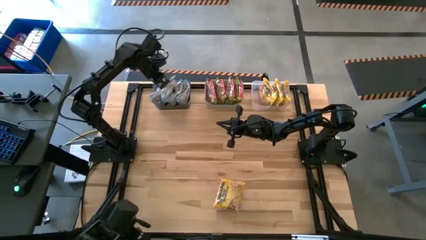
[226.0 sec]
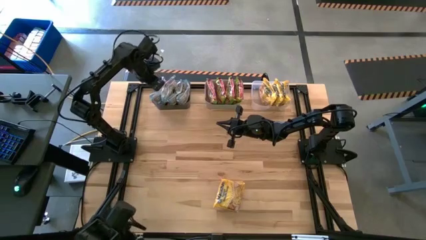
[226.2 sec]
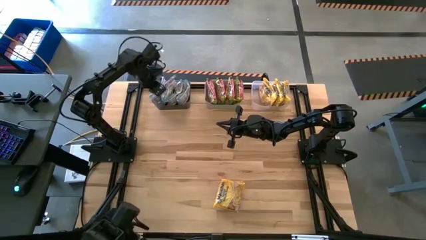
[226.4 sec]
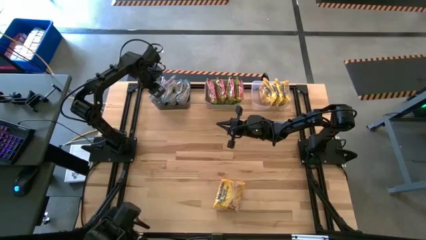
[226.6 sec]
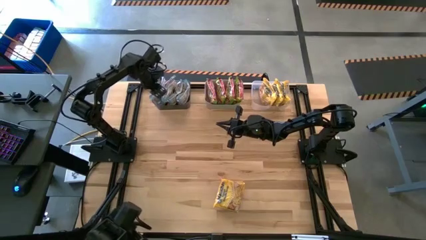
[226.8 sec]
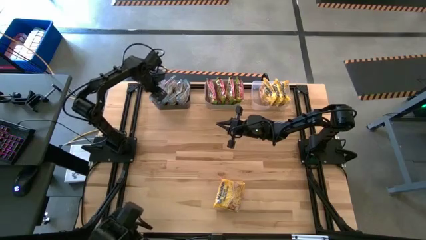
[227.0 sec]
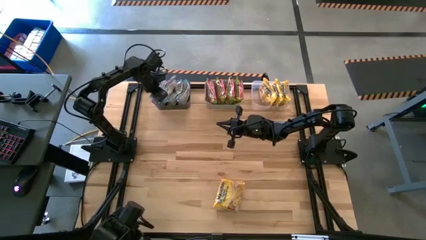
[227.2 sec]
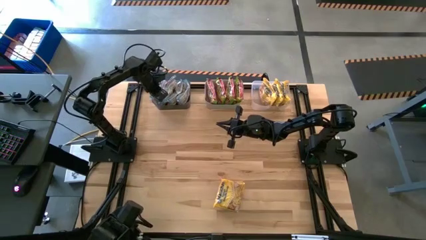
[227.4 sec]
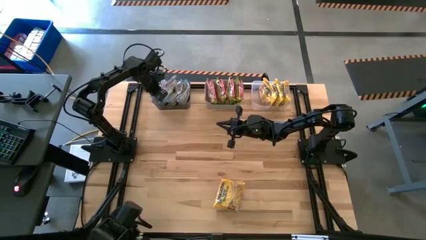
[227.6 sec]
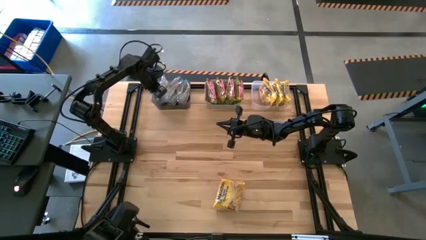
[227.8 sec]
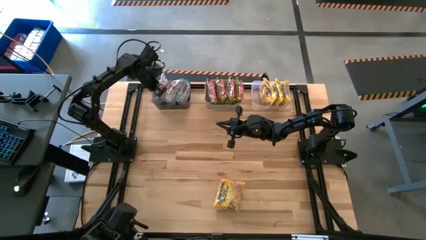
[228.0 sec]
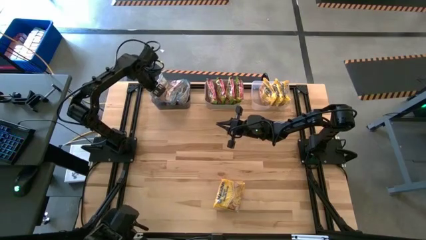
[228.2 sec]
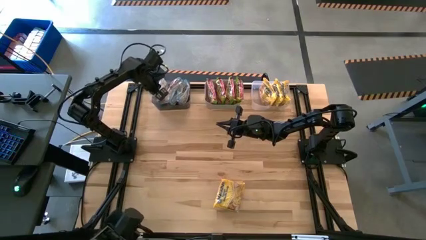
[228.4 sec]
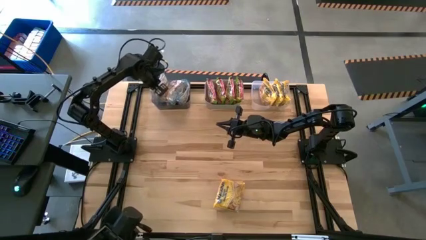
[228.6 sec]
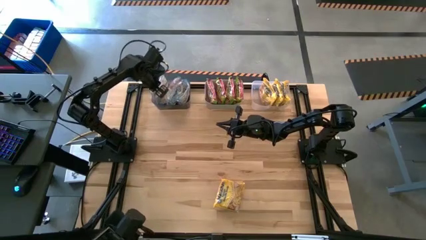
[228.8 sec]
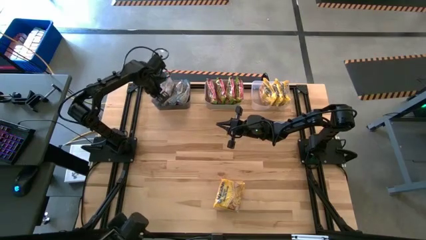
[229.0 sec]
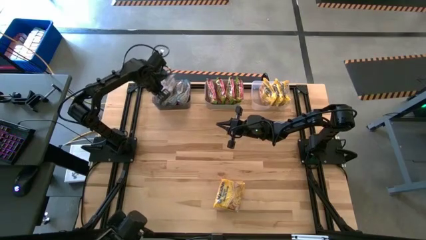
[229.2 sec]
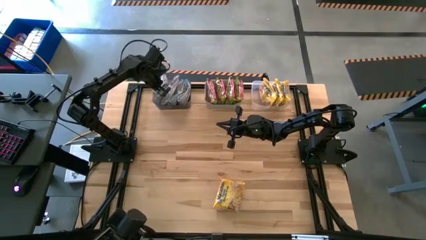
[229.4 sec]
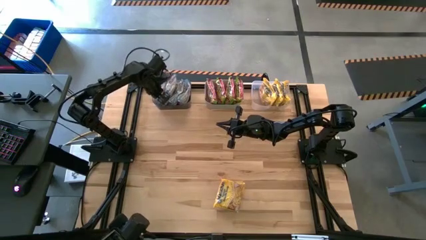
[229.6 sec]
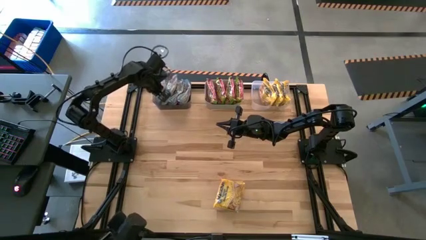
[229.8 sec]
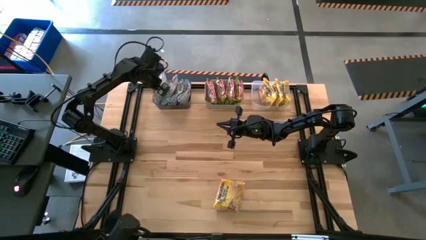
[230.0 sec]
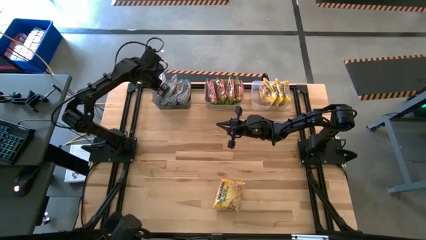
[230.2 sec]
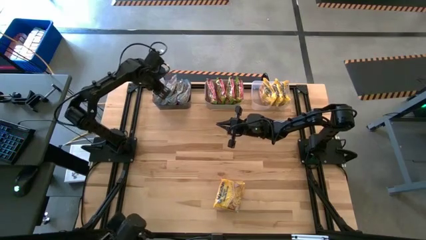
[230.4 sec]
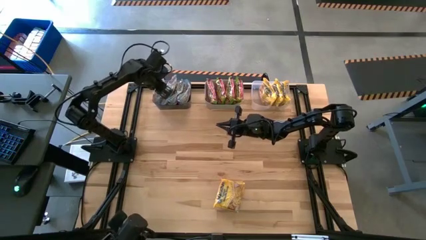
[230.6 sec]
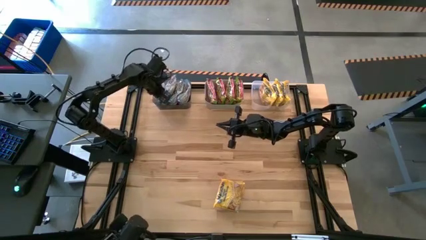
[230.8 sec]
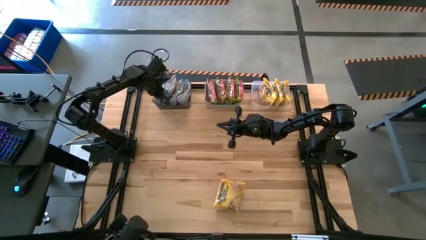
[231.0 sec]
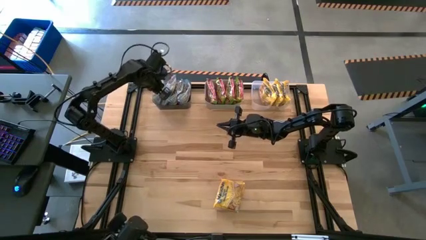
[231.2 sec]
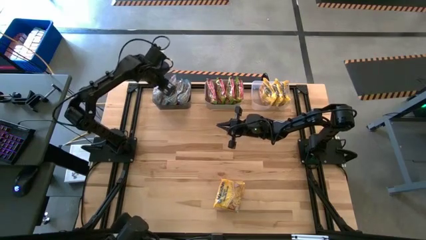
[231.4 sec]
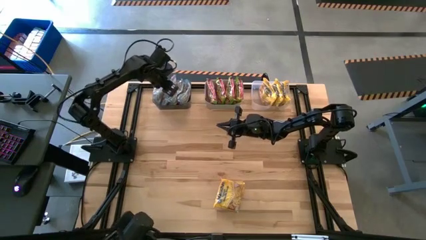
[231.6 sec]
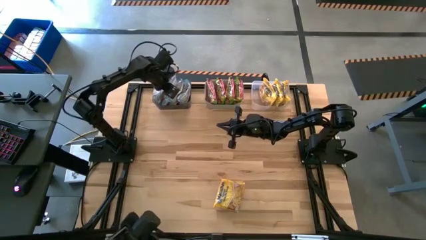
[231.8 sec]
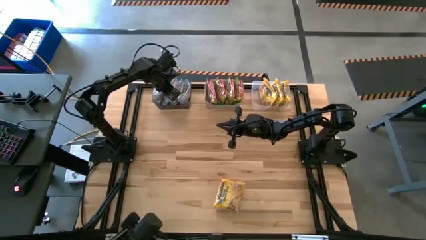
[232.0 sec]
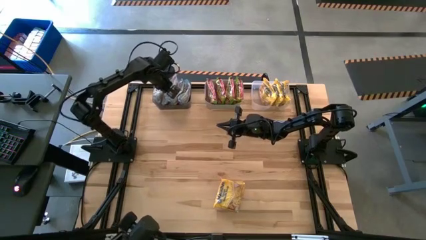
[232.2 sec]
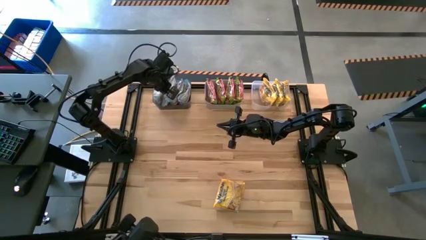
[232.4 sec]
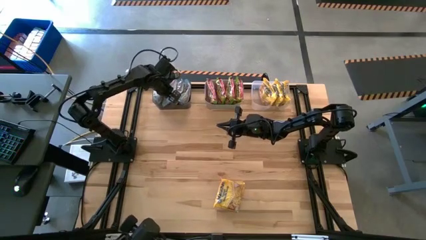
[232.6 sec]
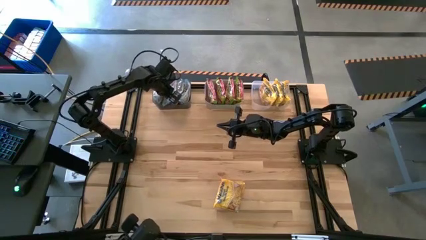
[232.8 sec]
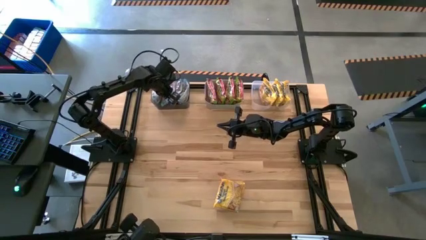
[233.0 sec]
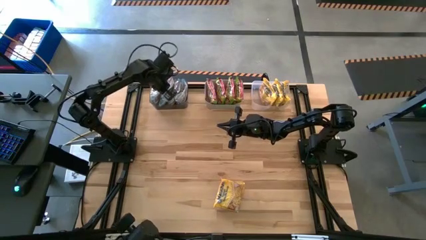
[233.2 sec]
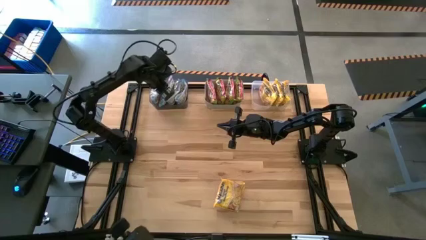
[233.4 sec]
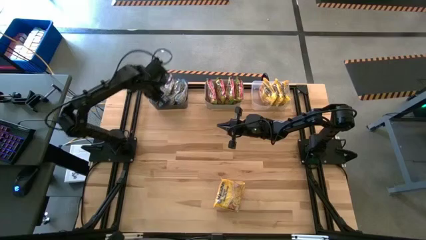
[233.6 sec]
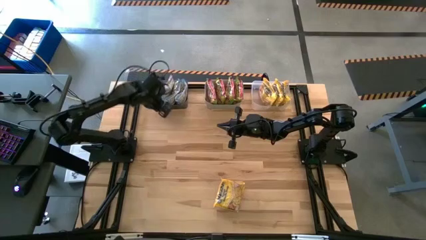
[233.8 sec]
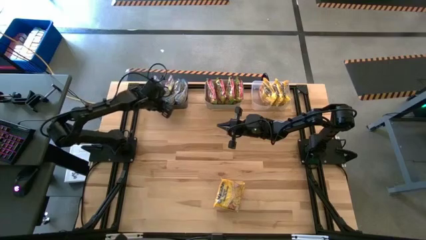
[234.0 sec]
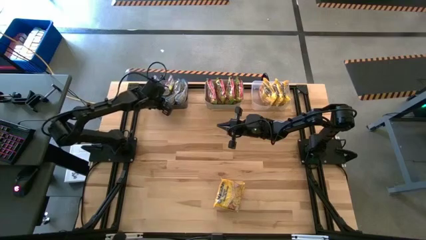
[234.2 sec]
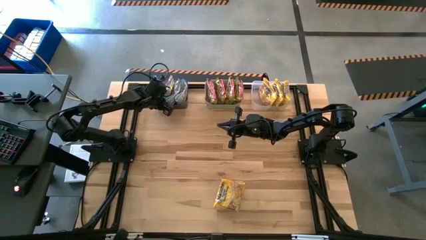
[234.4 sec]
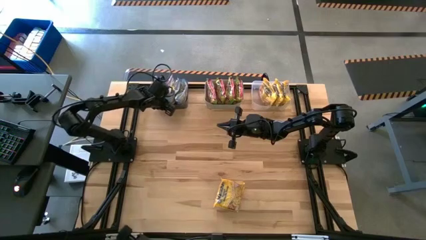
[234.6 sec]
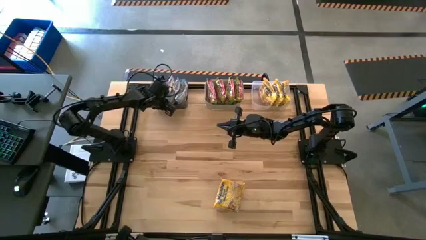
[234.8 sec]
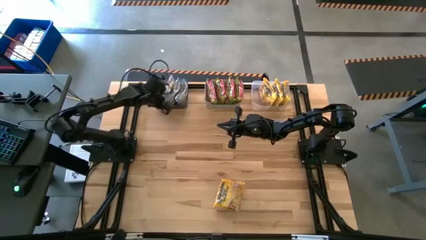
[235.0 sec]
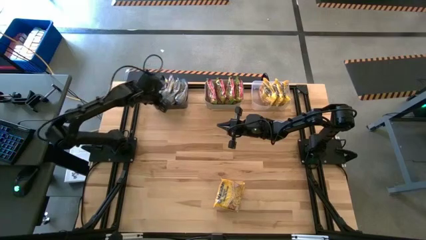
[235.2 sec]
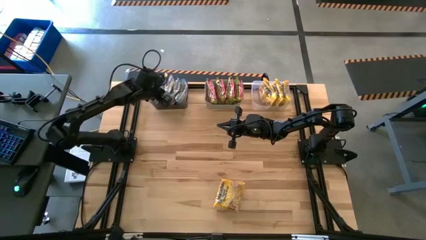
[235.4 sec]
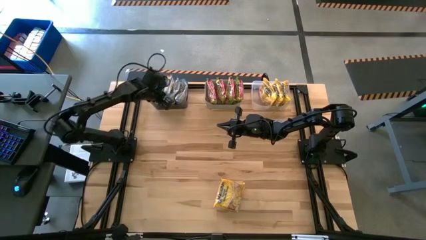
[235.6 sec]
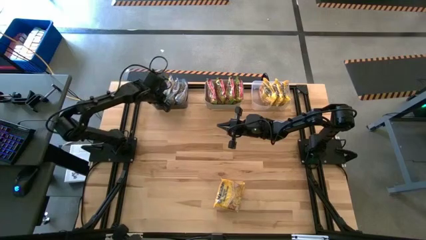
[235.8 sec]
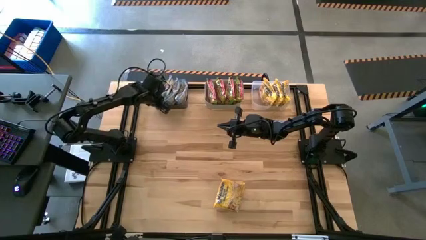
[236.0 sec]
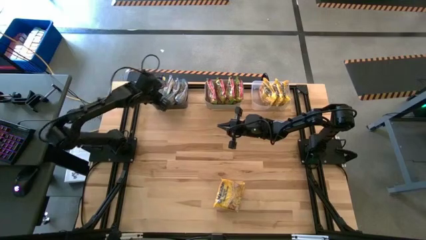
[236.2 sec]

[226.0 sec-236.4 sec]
Task: Sort Maruchan noodles
Adjust the blue noodle pack in the bin

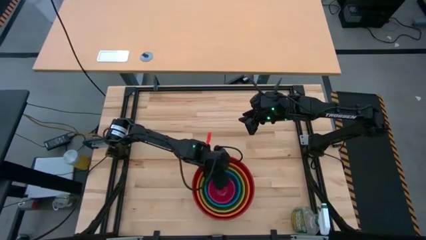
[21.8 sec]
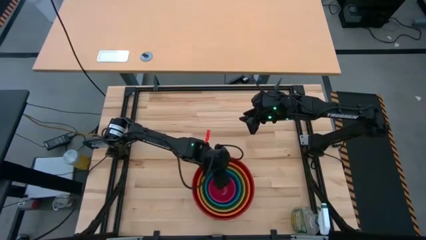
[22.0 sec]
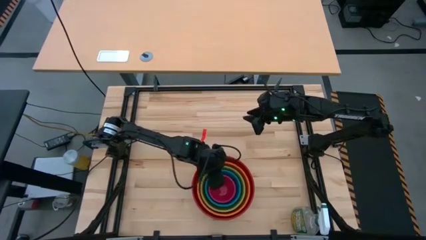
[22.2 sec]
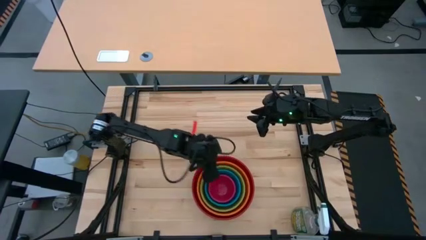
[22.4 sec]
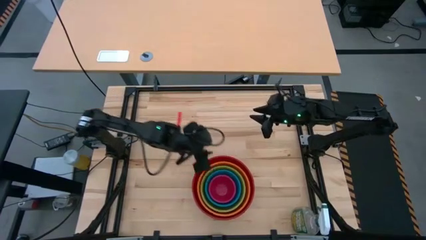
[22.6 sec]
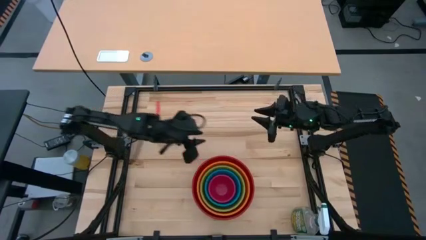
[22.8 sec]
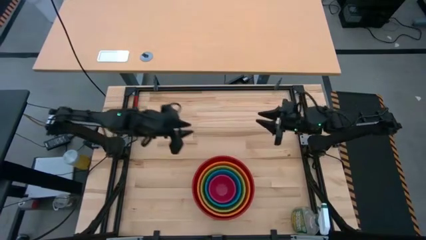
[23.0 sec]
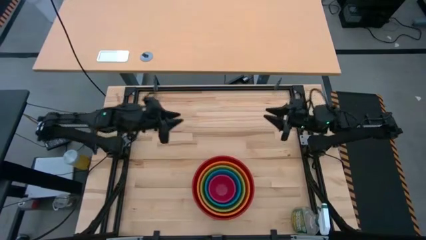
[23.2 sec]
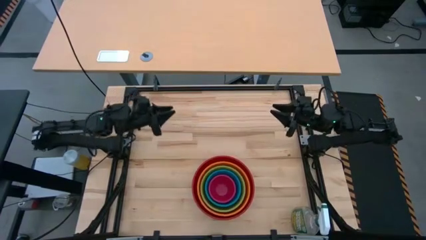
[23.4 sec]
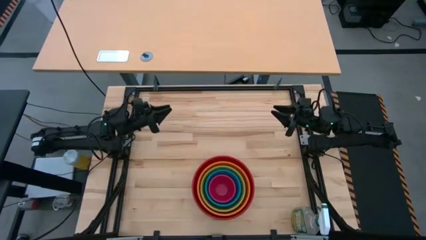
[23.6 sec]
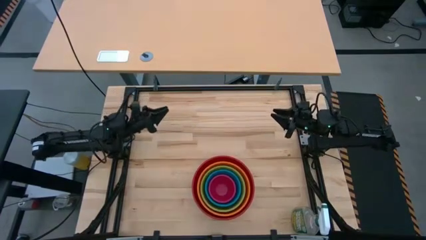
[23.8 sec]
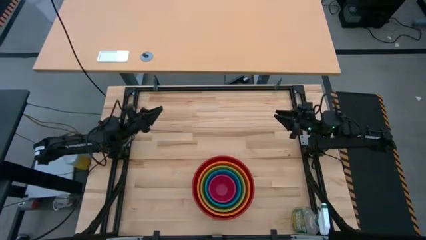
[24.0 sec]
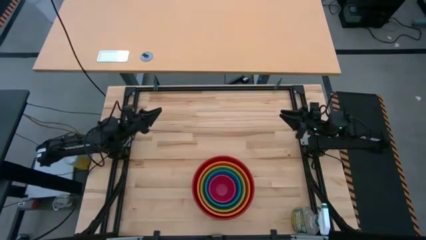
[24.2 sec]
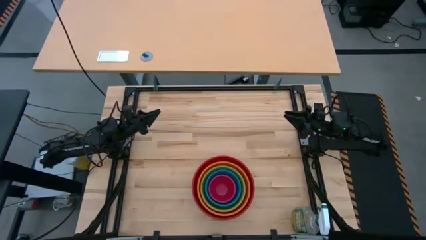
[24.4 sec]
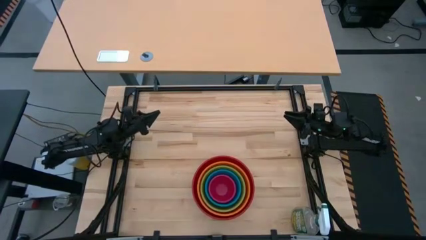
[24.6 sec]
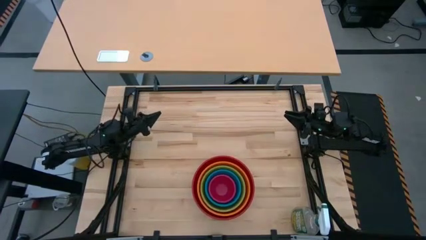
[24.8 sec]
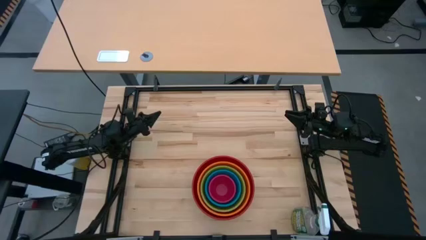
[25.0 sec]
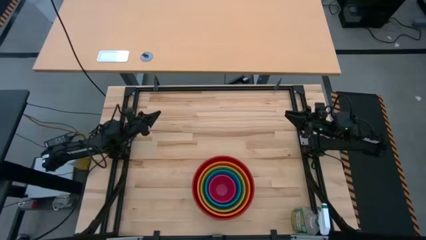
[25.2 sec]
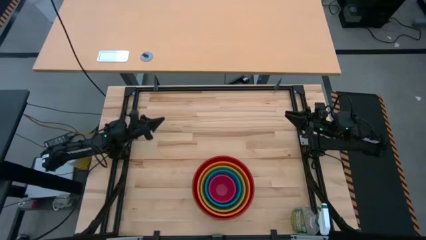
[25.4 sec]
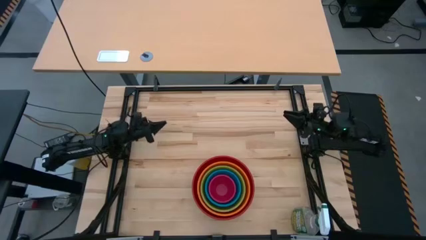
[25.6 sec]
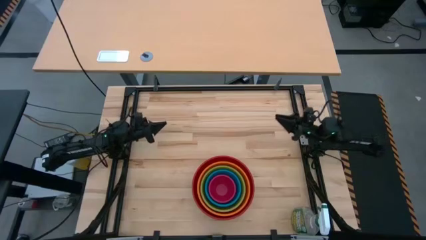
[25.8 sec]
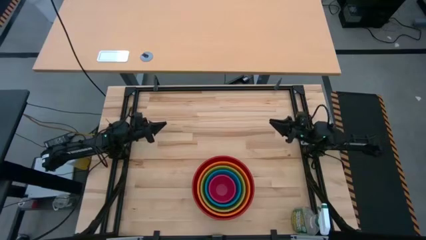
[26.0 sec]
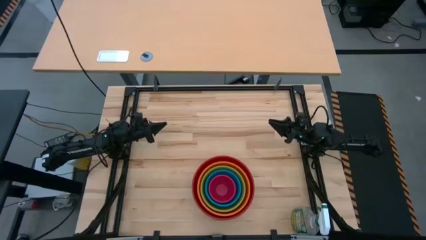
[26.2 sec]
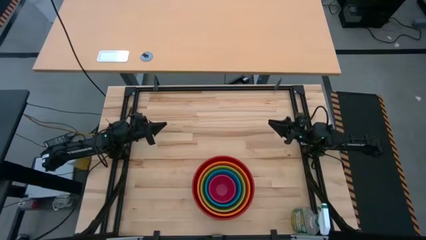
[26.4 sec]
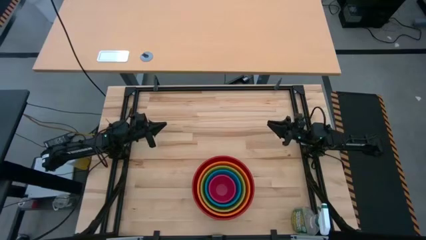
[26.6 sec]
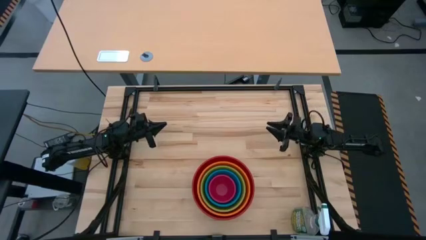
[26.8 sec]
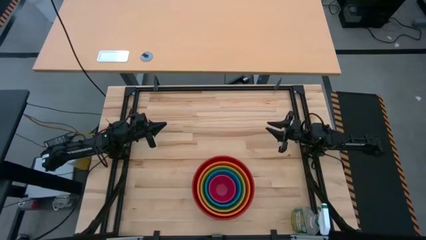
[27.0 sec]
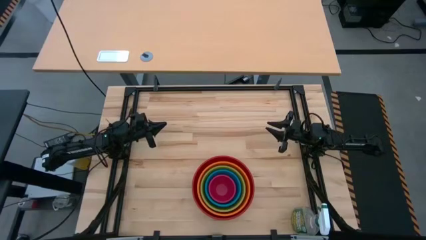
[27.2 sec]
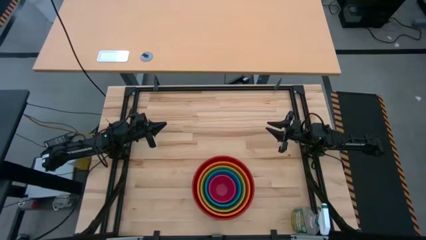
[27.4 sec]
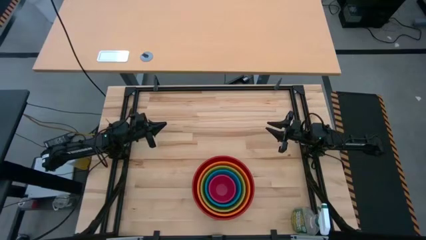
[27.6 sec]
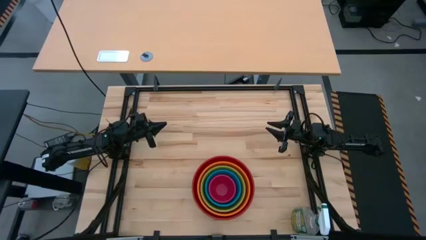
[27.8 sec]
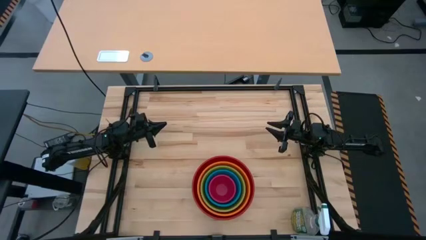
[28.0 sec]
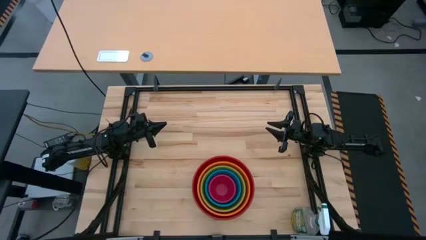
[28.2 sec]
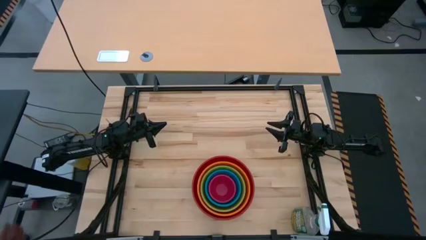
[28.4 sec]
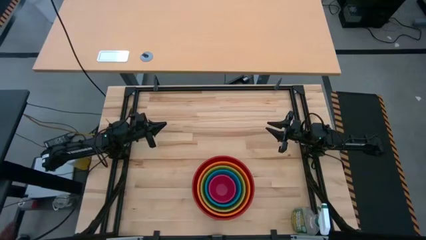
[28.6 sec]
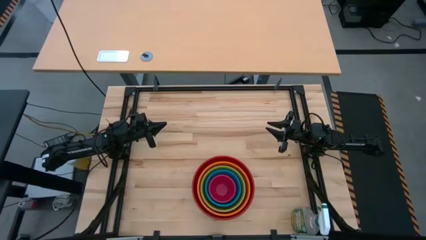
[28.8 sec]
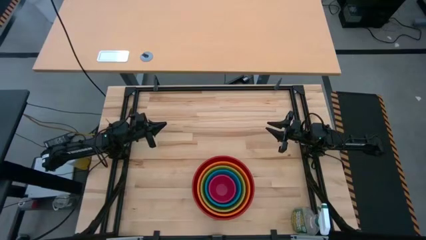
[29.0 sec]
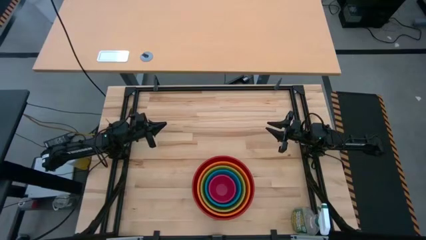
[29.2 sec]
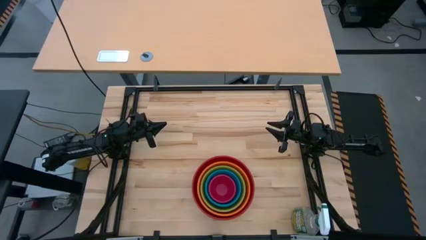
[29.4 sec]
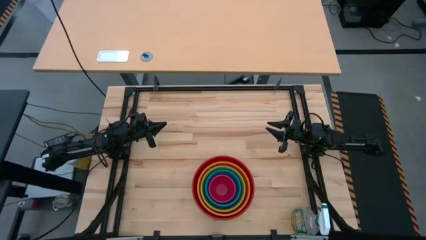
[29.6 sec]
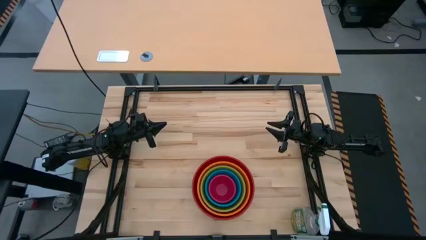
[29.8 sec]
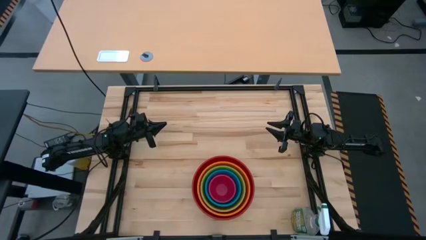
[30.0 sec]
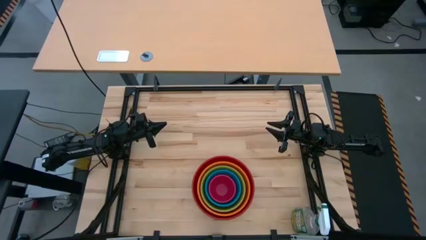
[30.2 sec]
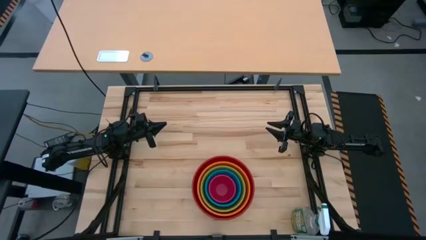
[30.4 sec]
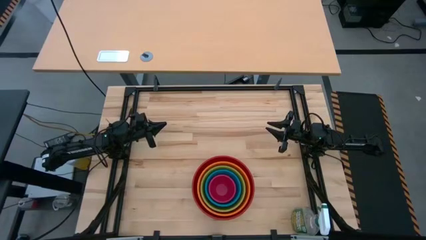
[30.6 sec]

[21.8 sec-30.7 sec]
Task: Nest bowls inside each other by size order
Return to Home Position
